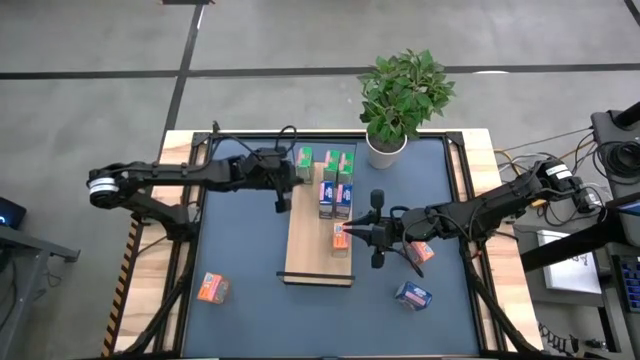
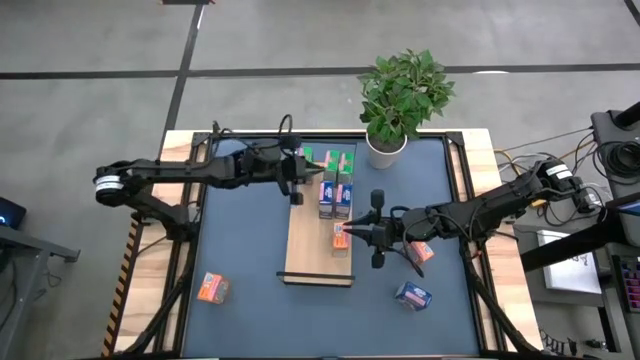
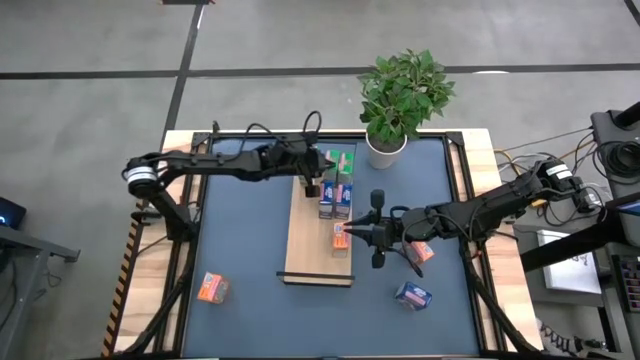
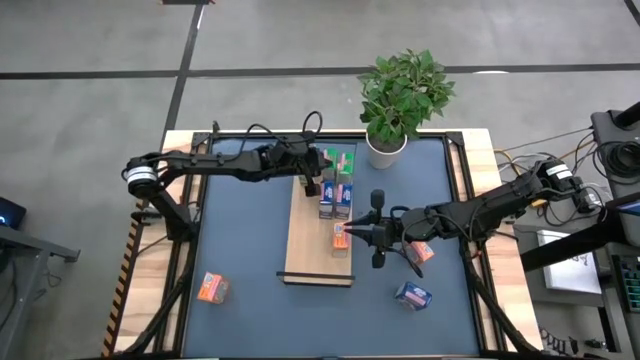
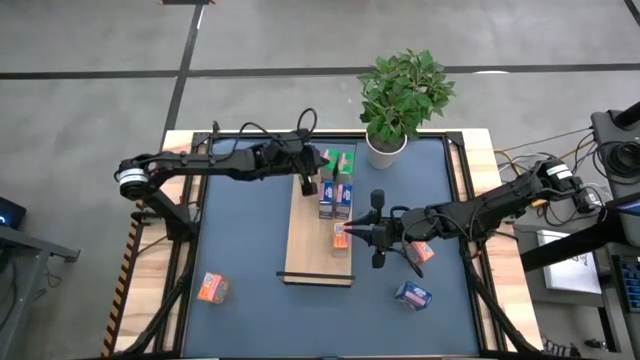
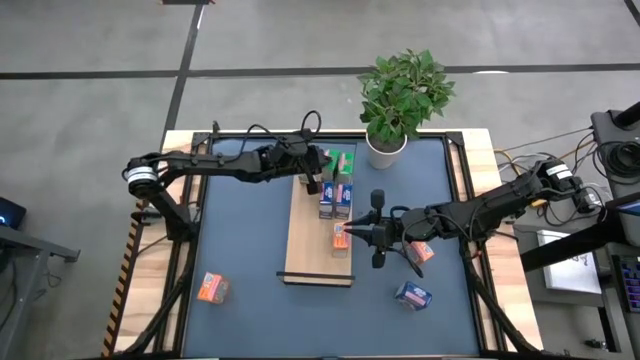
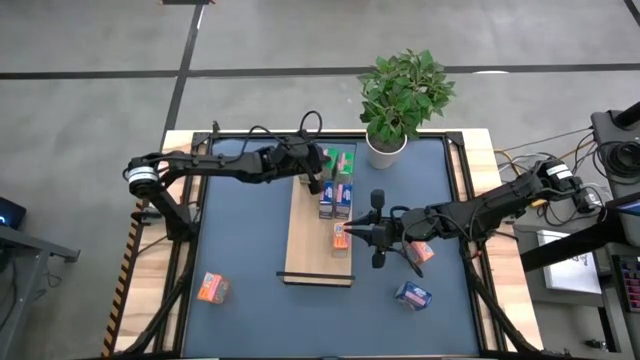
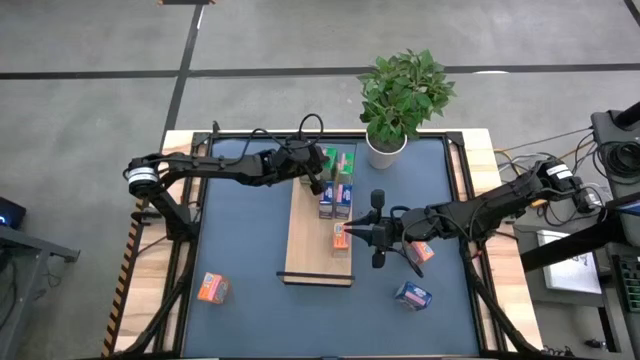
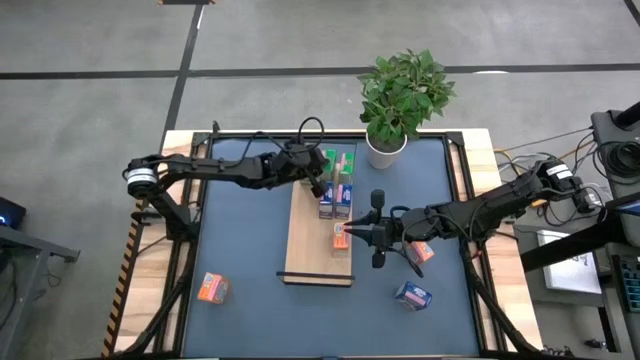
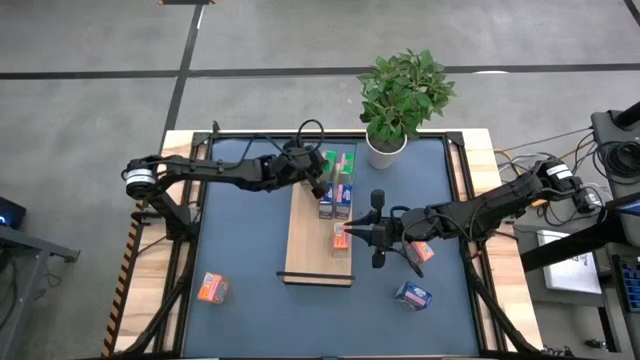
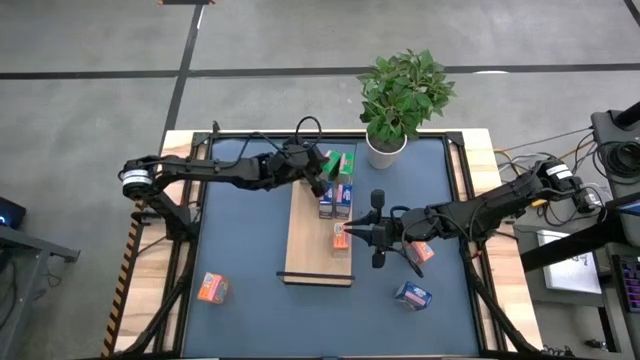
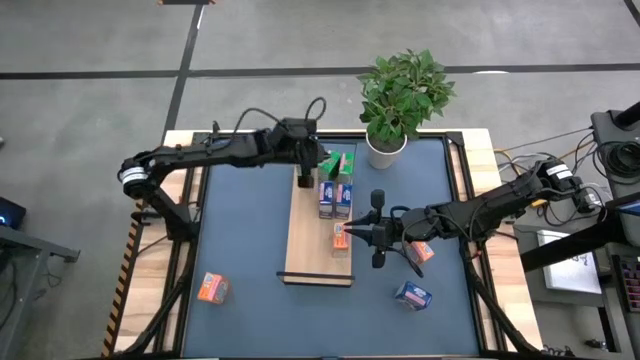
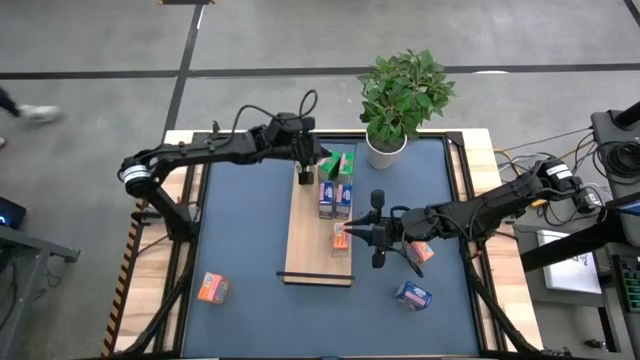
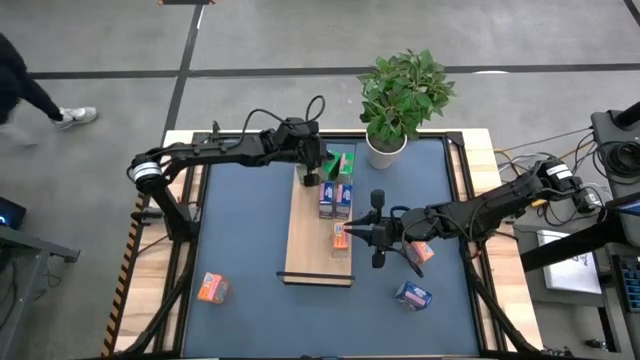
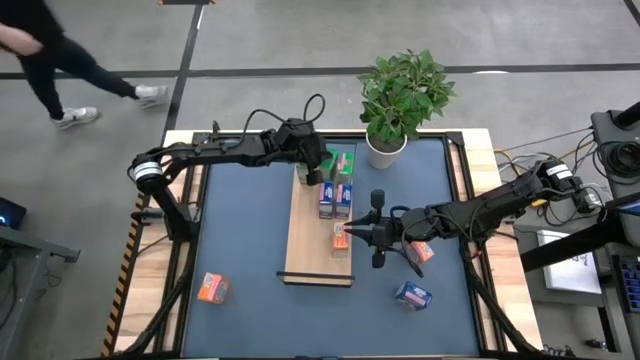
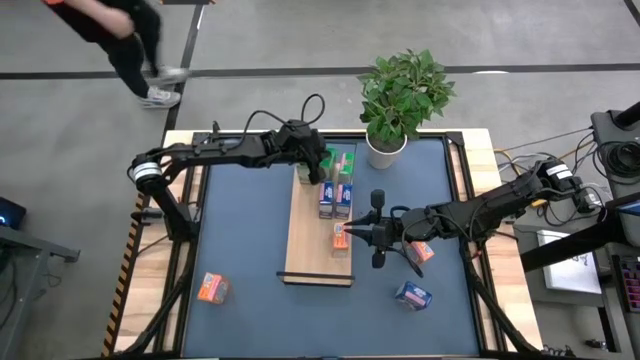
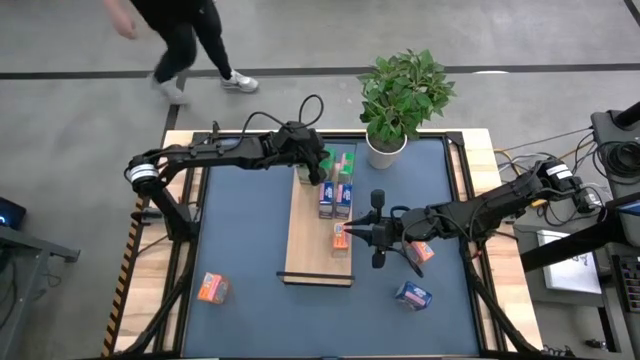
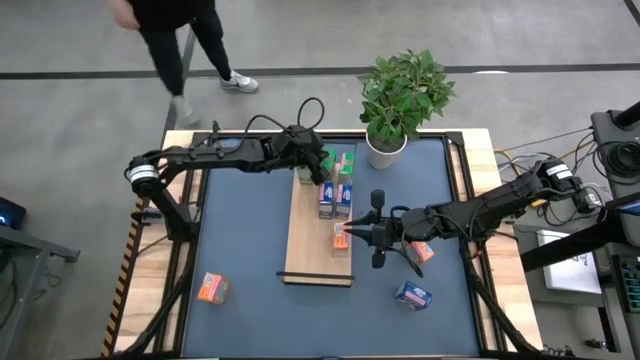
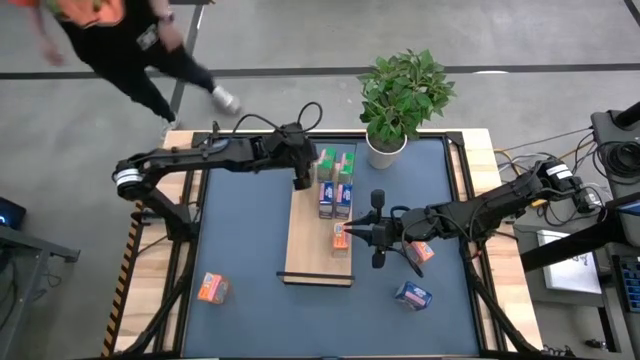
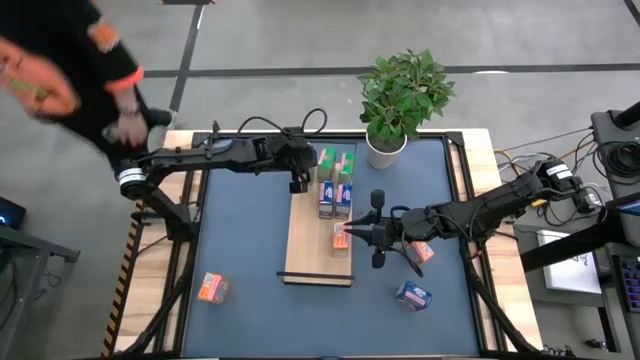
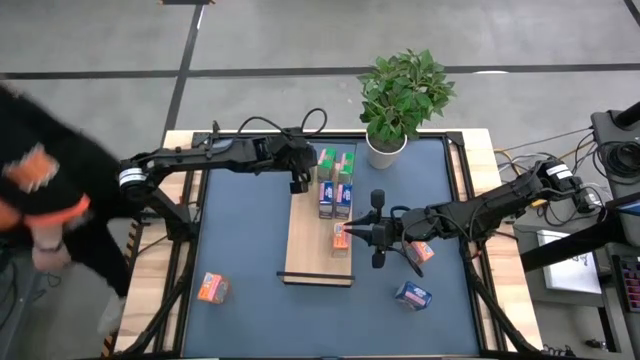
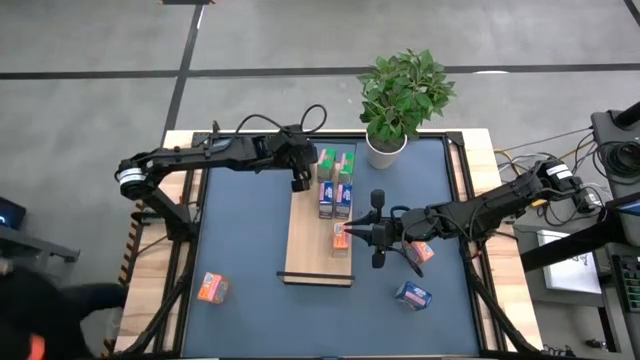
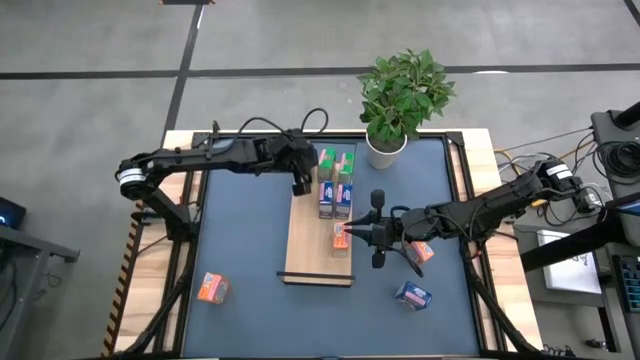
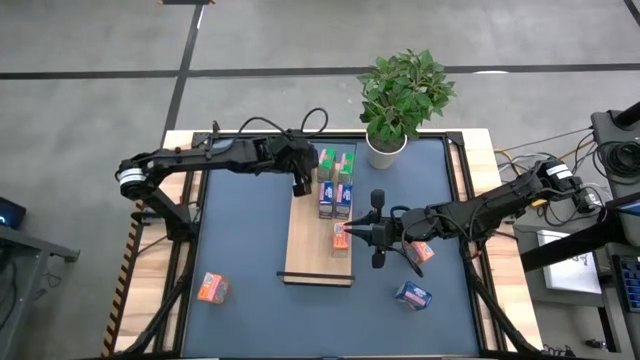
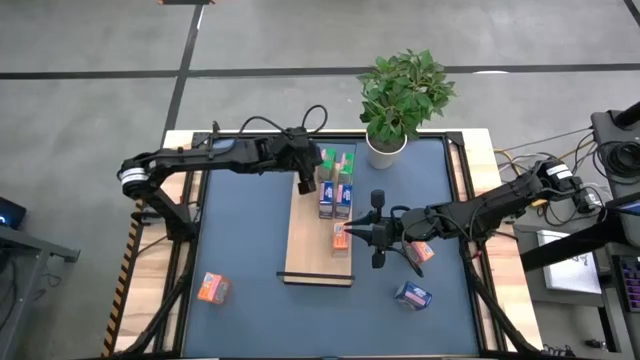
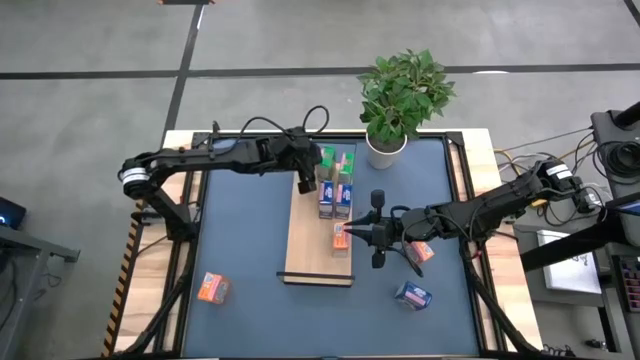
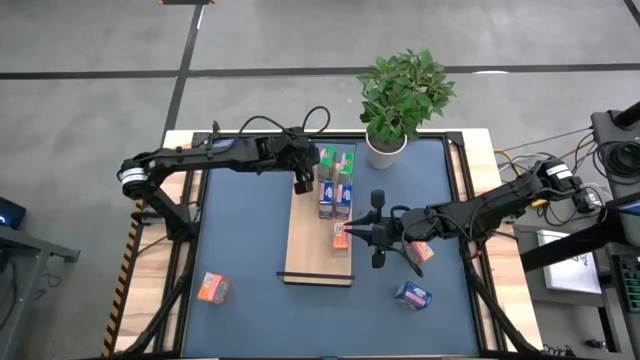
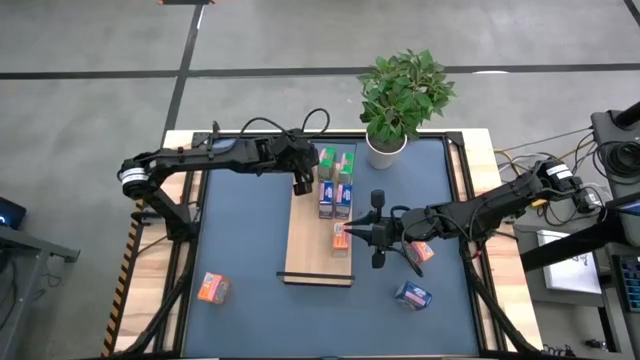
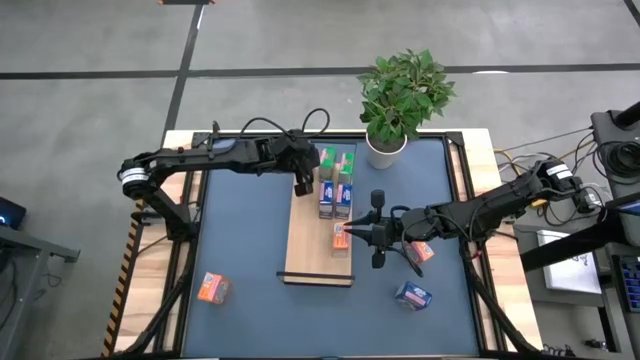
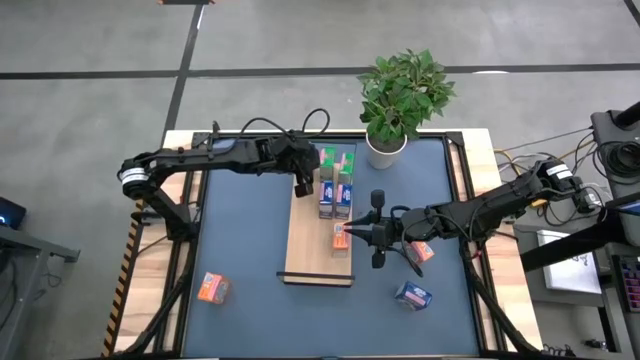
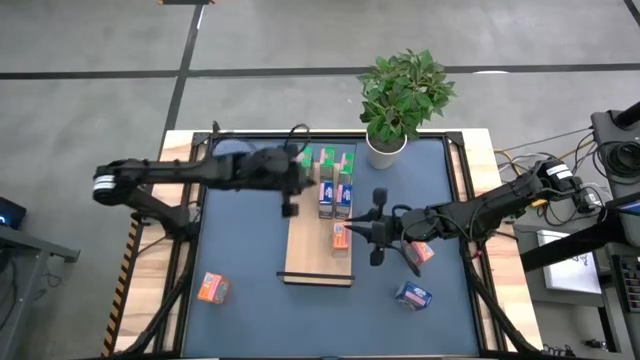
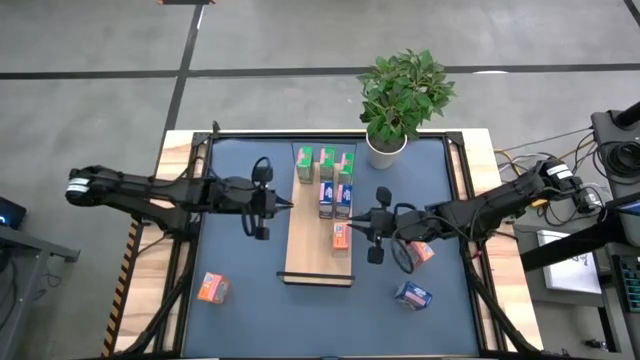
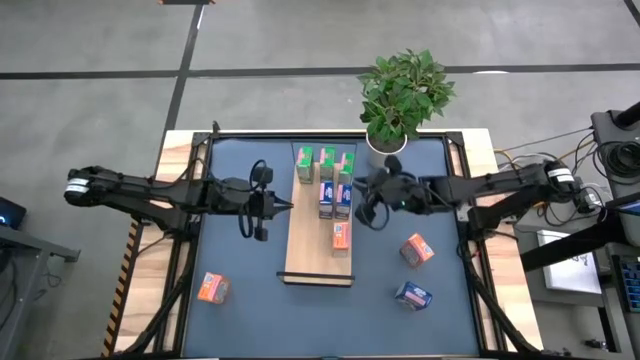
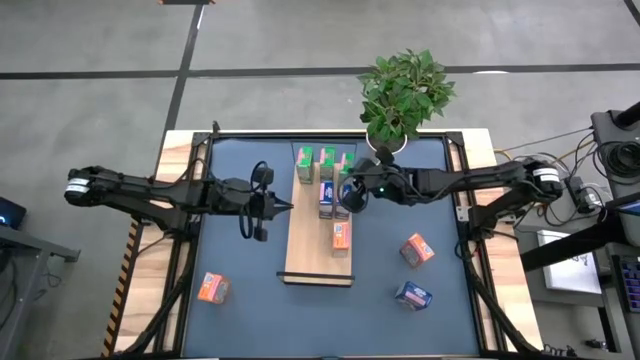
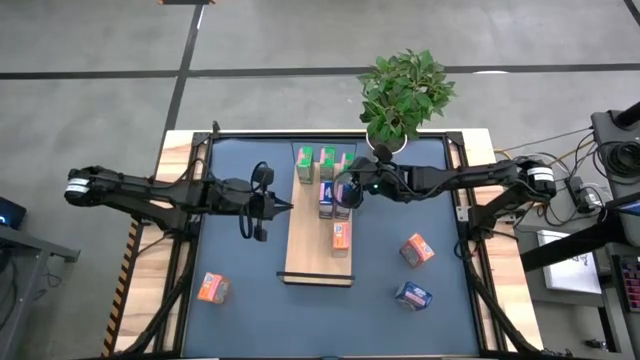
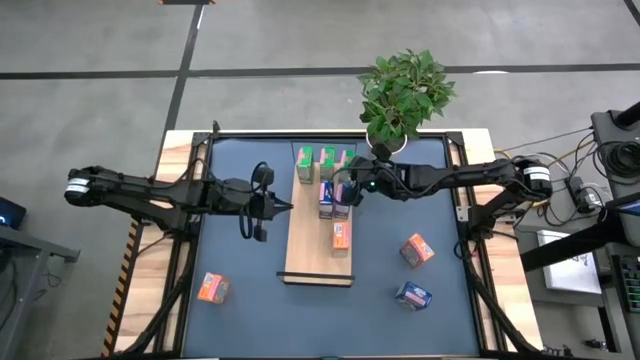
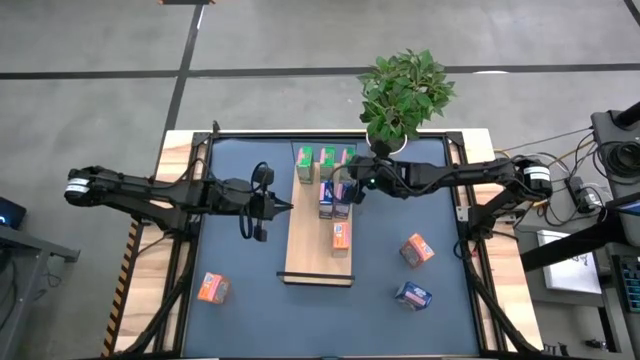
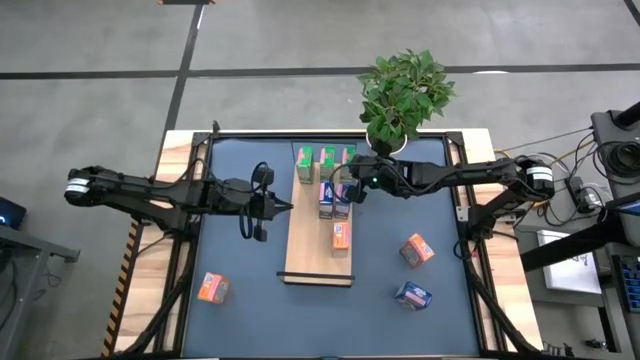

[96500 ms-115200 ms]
Task: Stack cereal on shelf
Adjust the green cereal boxes on the shelf

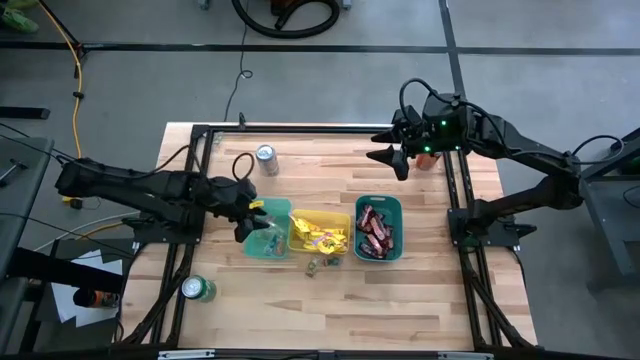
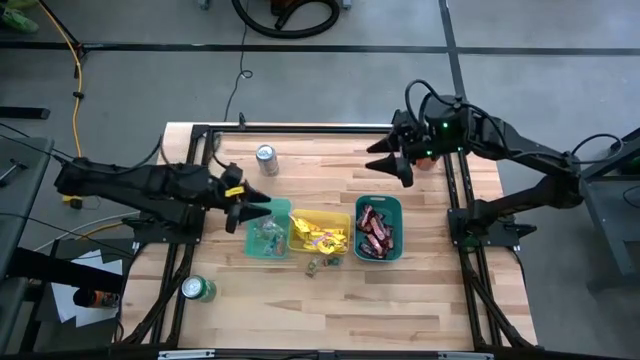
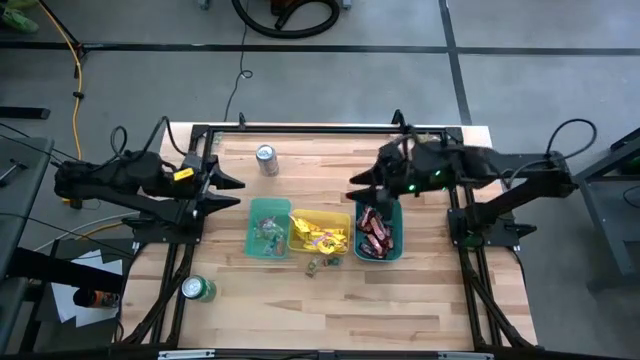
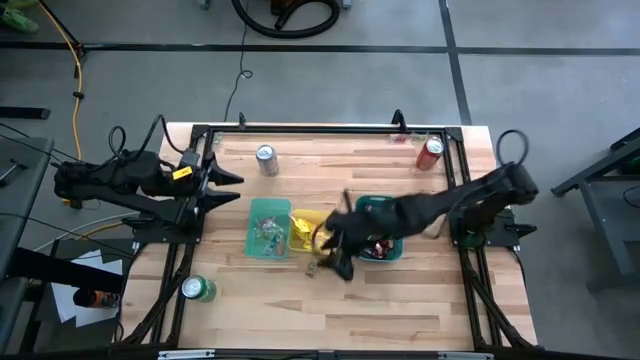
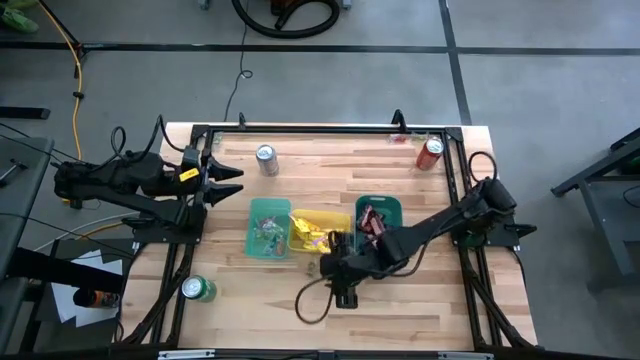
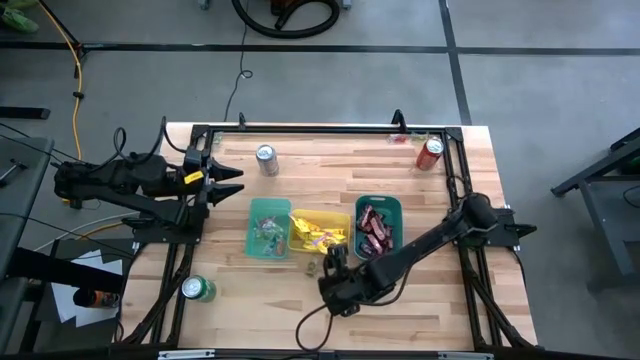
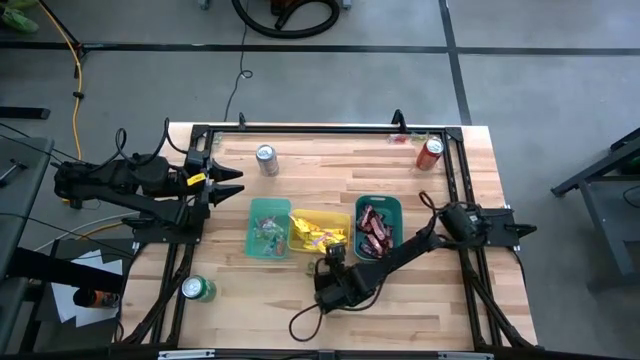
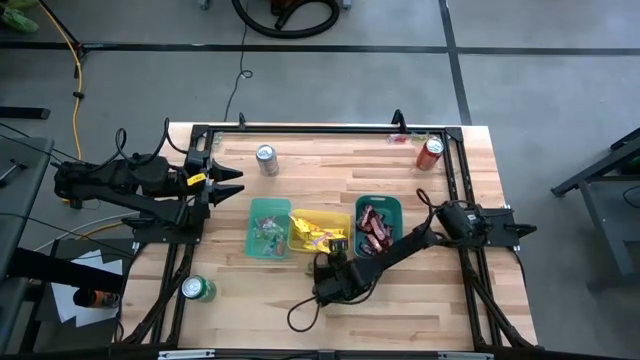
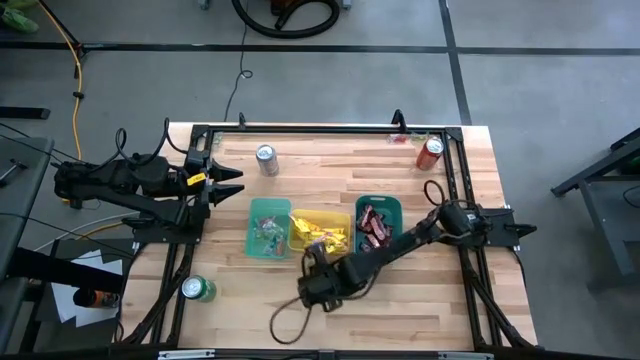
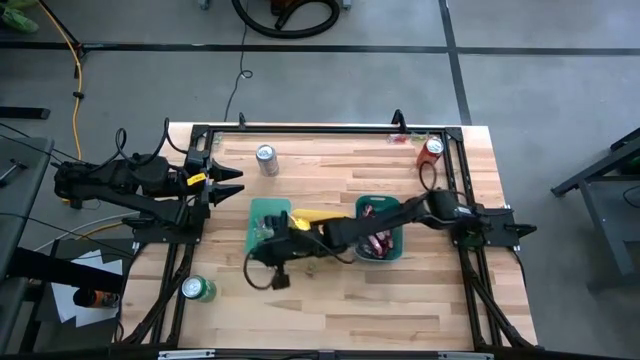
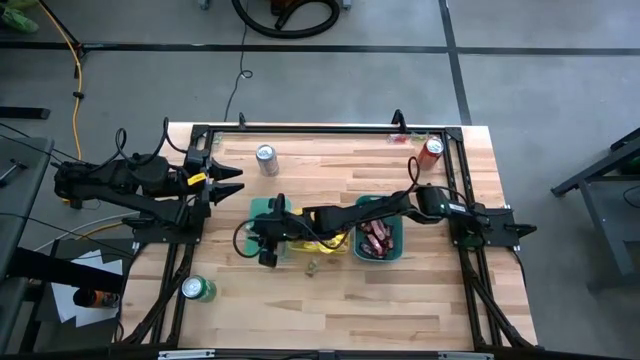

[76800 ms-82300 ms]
Task: Sort candy
Put the blue gummy into the green bin
